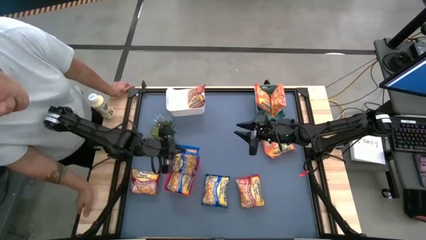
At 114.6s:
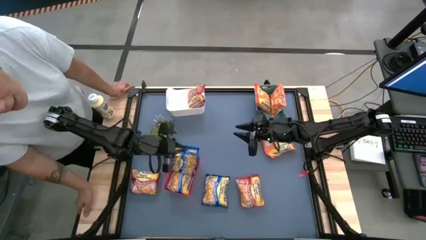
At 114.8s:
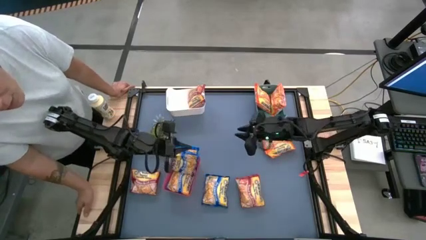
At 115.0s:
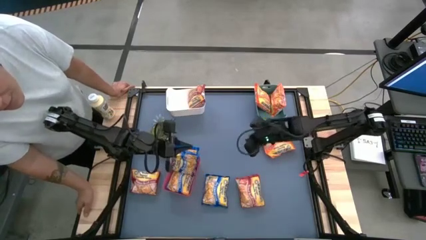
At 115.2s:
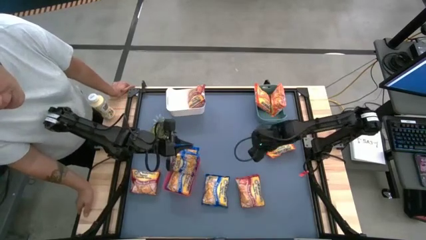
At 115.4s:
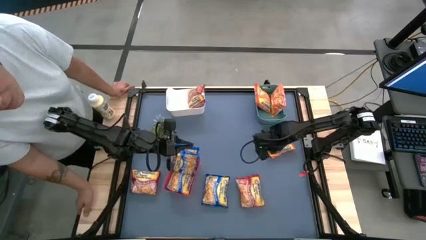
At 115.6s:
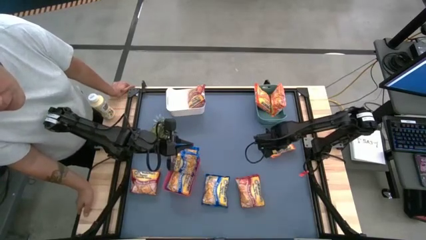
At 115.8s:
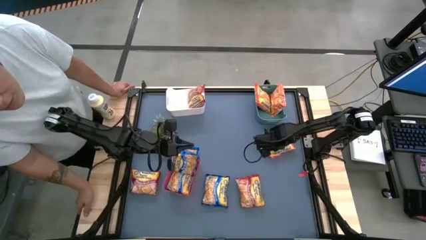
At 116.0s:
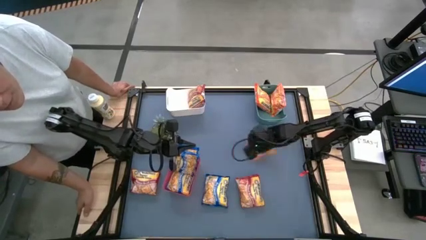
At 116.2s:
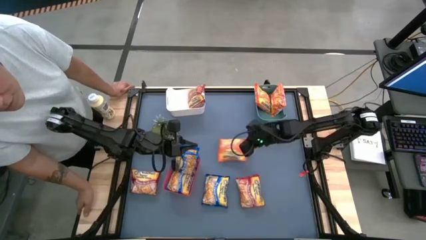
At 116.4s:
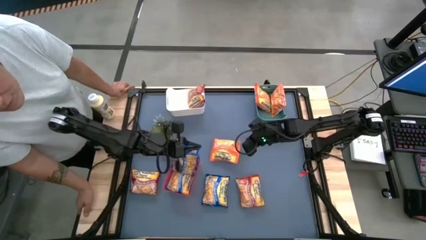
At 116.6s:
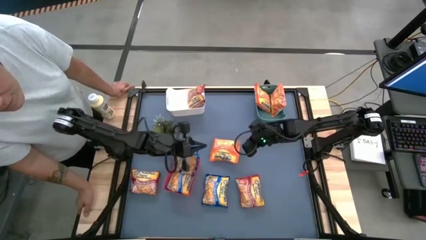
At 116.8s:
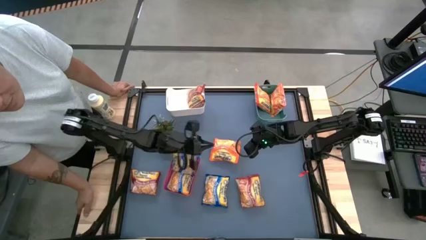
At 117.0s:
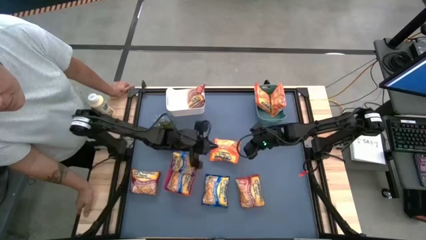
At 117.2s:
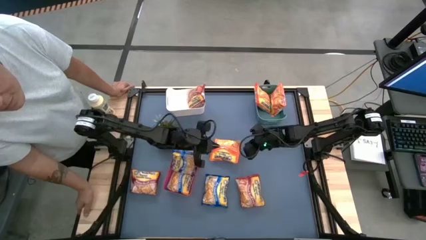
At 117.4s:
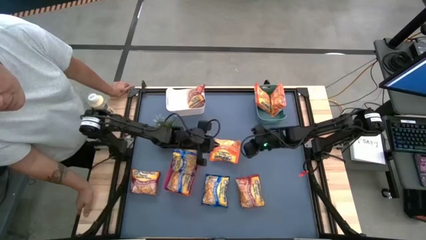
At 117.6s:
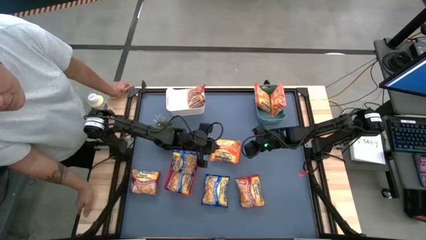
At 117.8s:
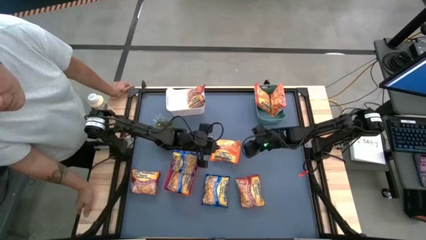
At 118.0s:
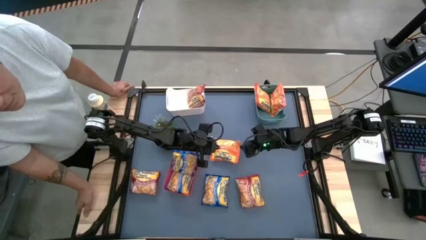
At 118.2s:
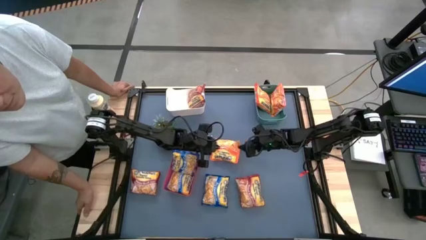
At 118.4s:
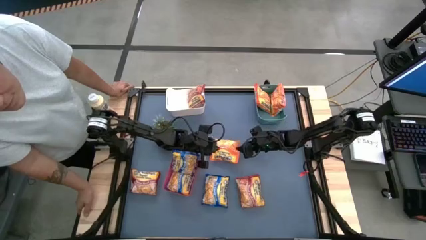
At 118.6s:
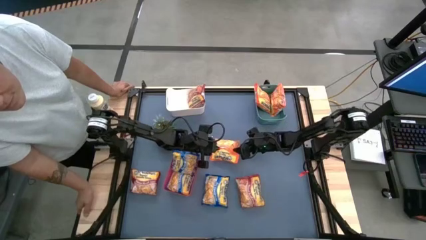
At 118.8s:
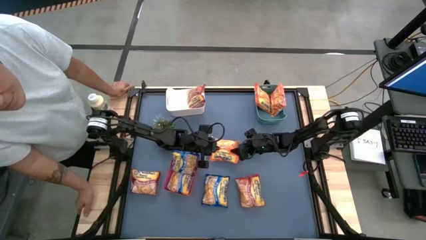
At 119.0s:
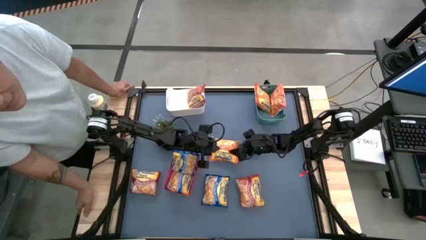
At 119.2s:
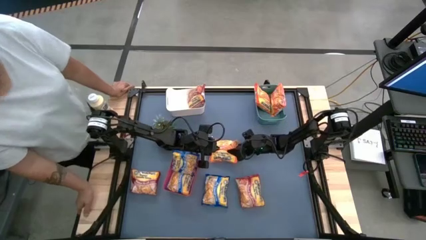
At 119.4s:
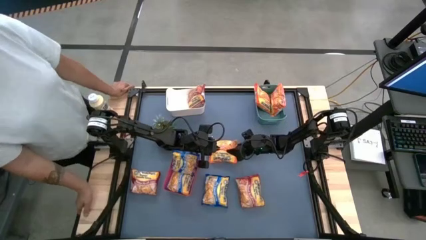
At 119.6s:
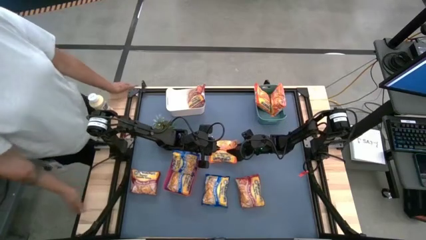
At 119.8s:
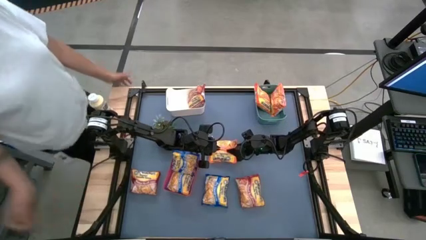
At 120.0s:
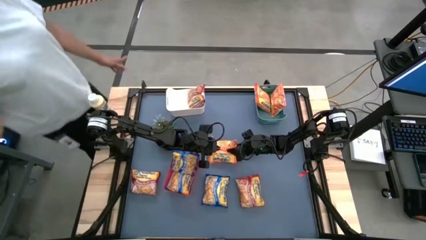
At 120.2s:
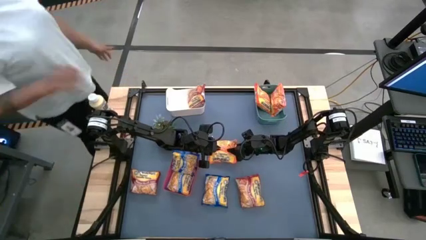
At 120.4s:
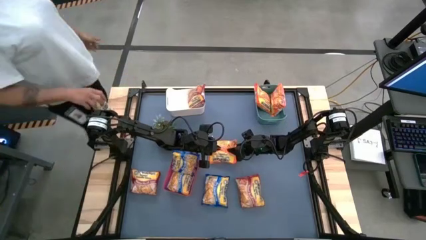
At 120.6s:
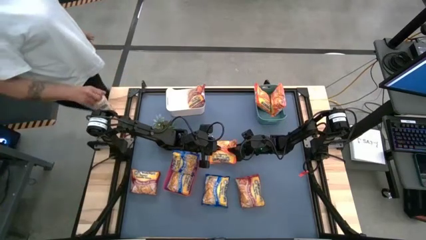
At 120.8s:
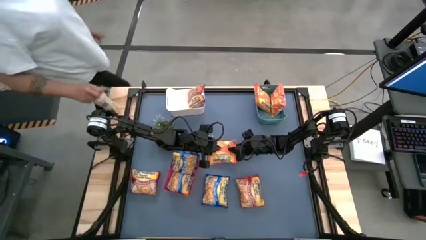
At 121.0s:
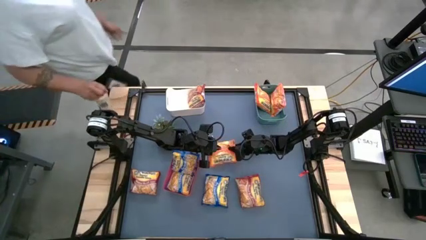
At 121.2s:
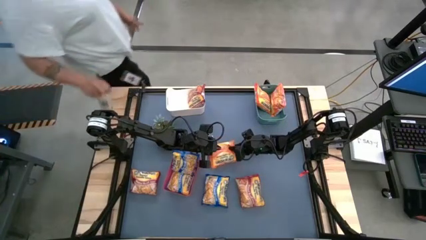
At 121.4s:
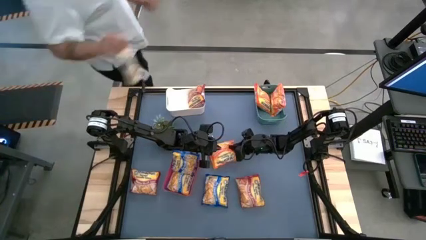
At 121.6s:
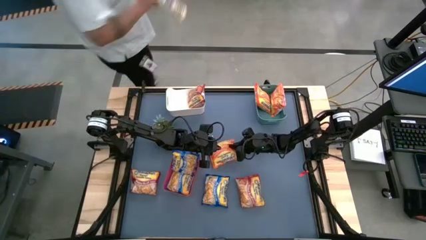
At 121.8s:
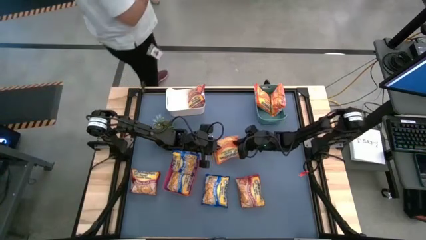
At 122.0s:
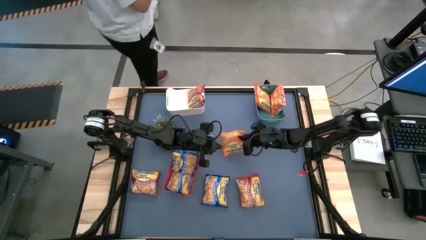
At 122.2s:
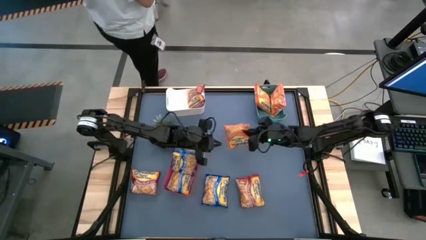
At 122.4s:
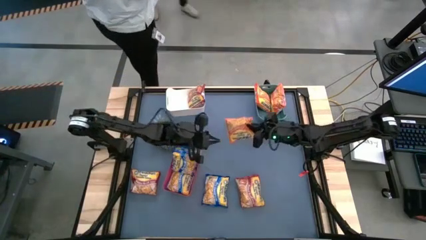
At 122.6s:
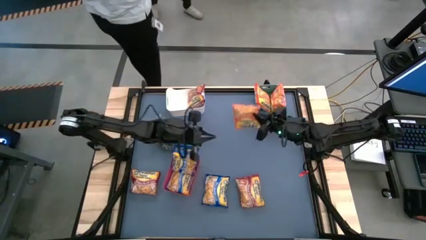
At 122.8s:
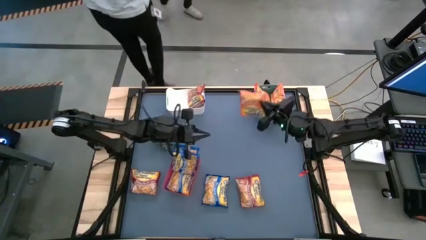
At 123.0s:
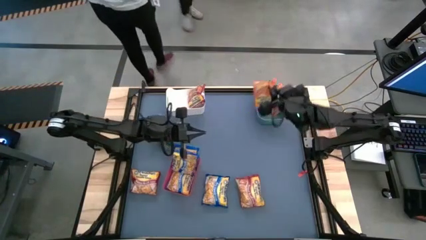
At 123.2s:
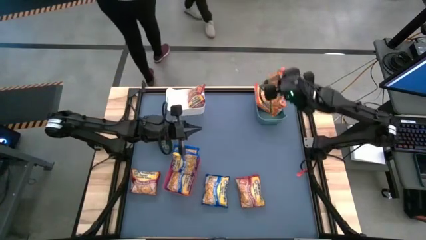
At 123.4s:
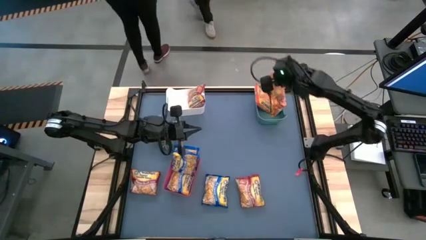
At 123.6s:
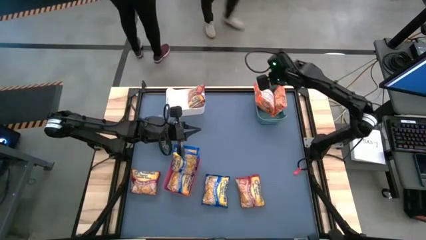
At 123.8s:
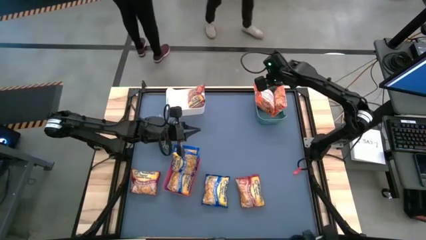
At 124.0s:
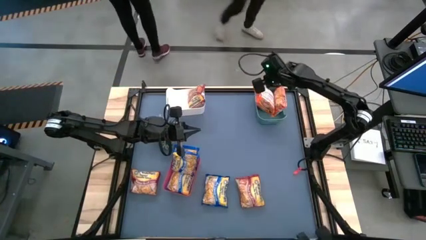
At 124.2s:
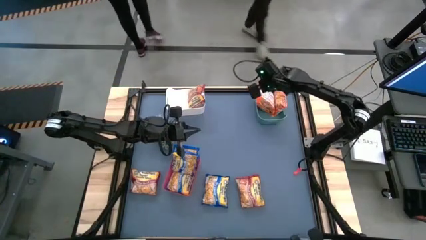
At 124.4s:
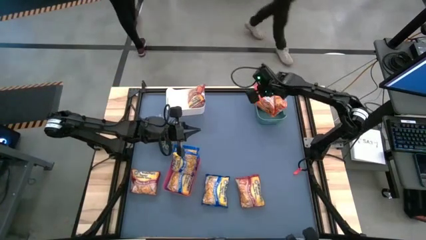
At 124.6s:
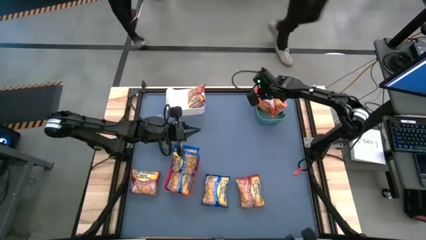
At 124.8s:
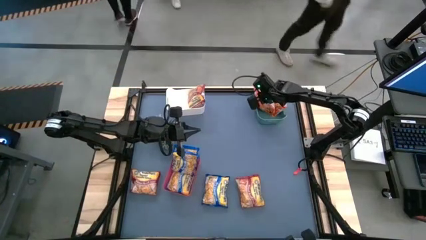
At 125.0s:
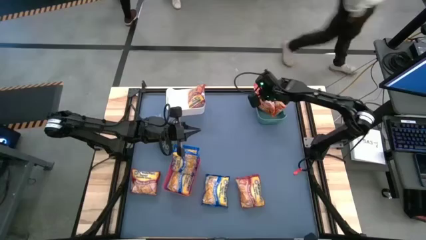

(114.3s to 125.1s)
Task: Sort Maruchan noodles
Put the orange noodle pack into the green bin

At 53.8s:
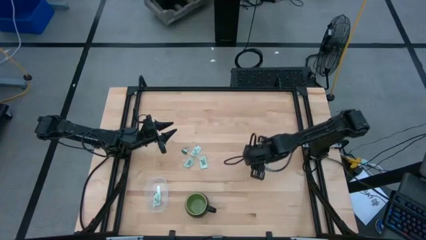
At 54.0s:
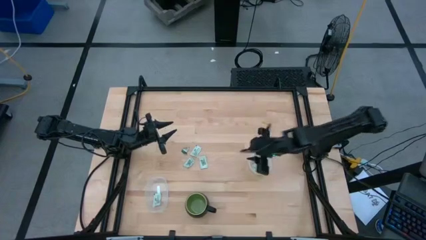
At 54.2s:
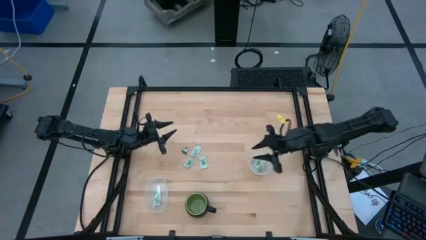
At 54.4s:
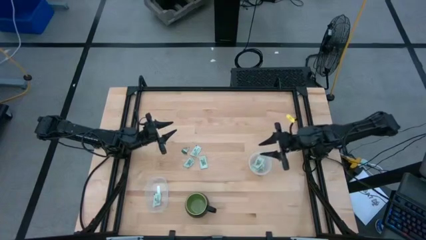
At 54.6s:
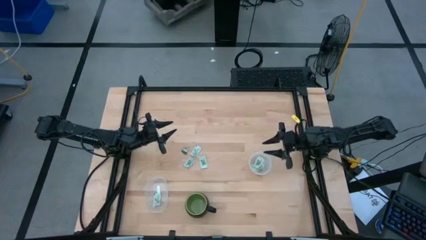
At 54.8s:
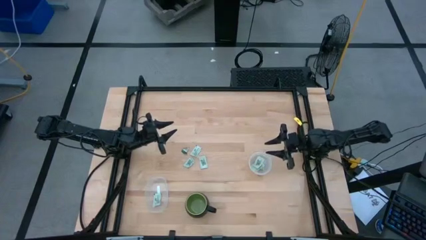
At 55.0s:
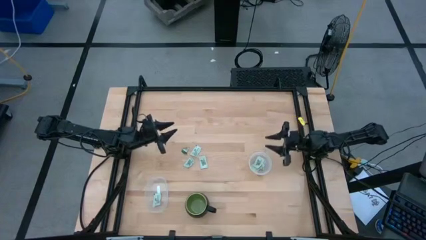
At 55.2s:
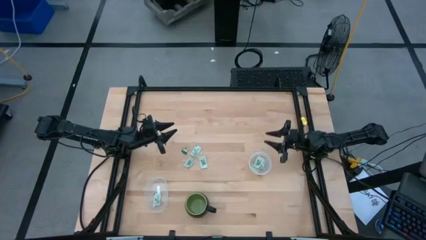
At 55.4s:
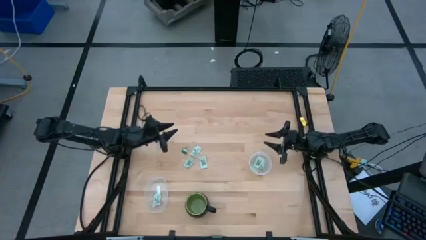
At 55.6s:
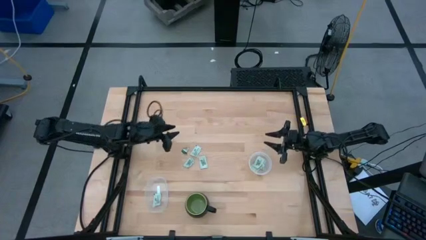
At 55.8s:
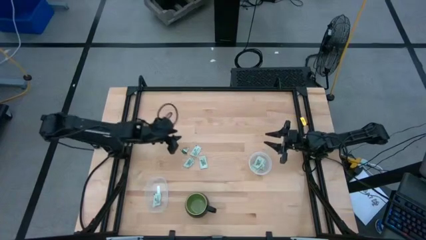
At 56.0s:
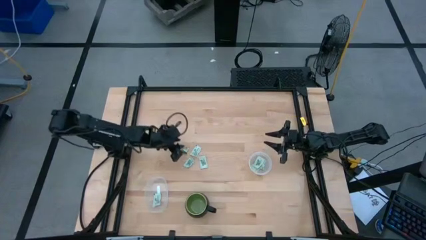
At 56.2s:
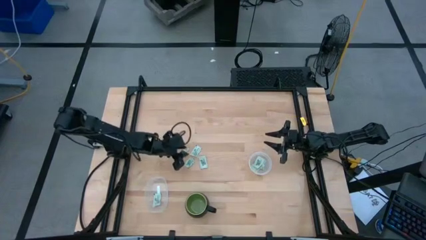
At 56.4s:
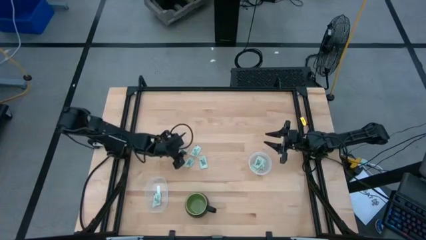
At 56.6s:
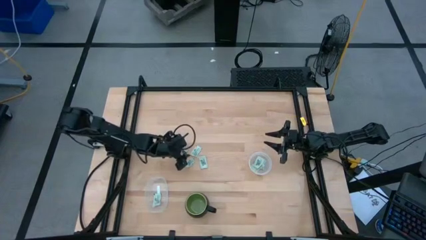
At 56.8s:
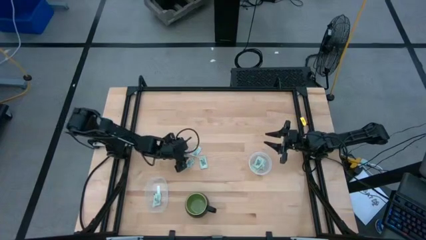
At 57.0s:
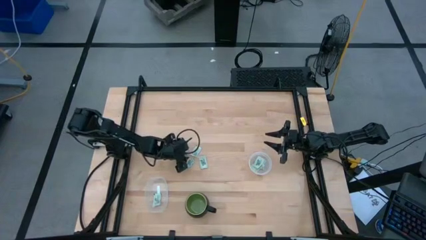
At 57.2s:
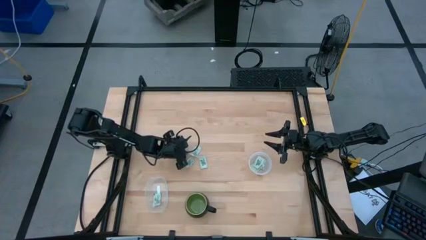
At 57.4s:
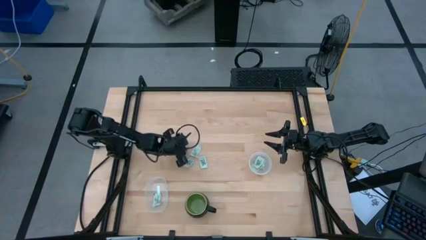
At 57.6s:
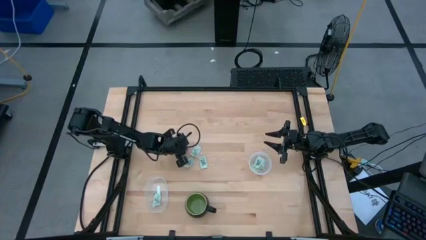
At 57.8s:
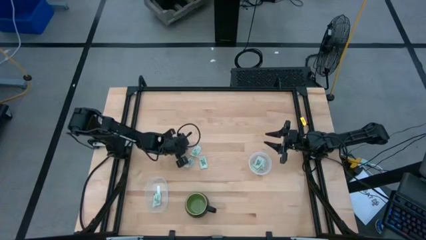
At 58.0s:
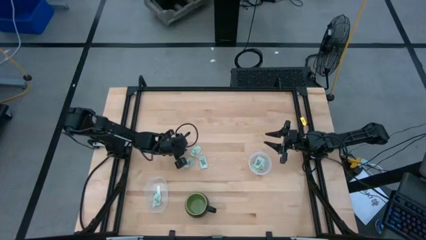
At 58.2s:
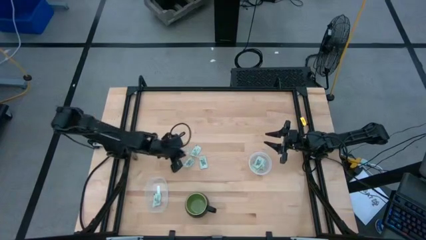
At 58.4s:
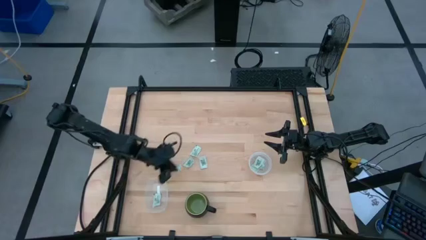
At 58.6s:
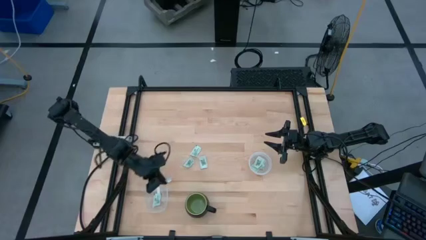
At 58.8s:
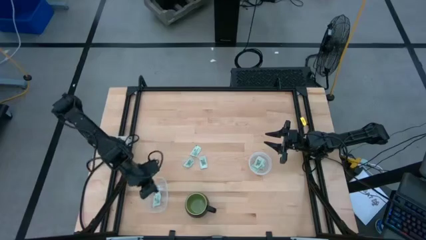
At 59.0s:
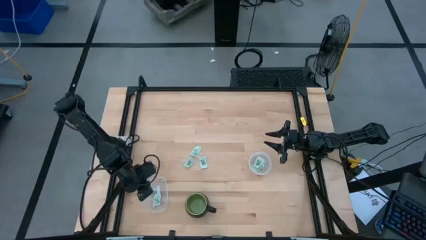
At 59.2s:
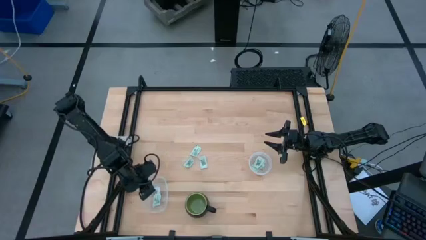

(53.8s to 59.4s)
Task: Pick and place Stevia / Truvia into bins
Put the green truvia packet into the rectangular transparent container
